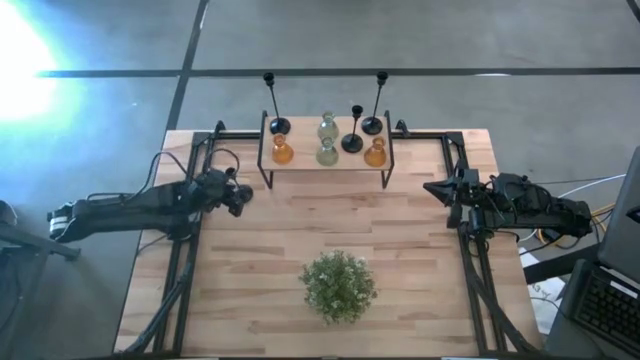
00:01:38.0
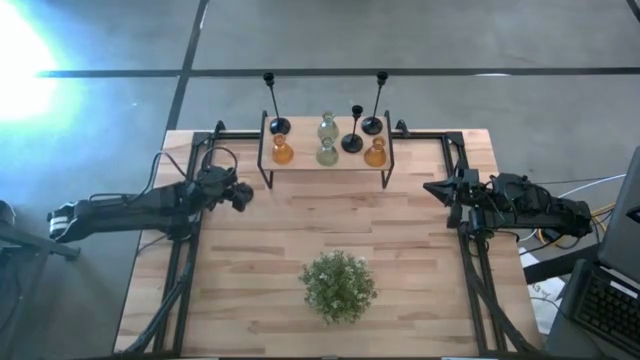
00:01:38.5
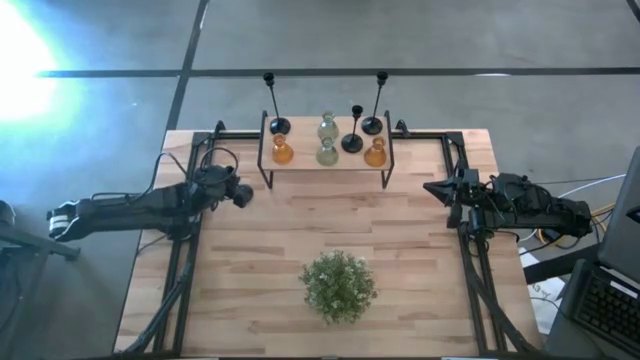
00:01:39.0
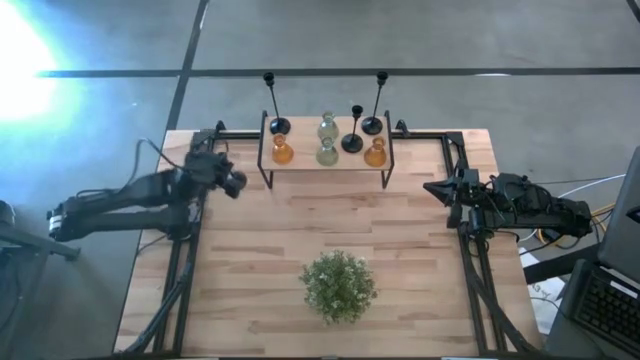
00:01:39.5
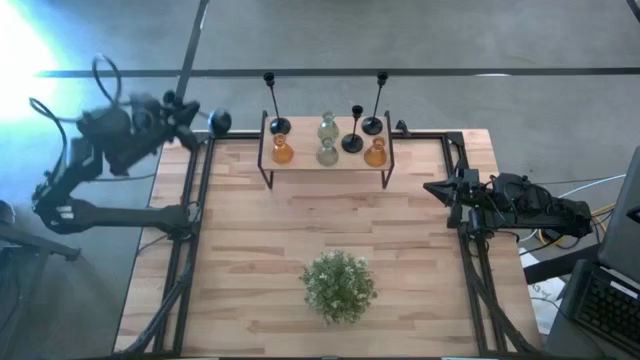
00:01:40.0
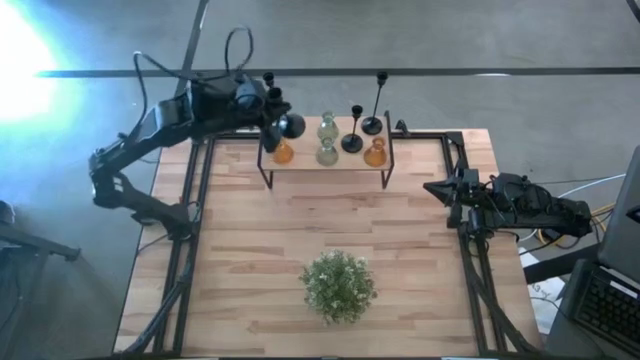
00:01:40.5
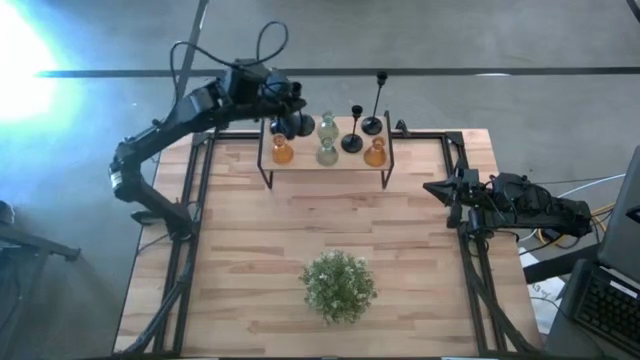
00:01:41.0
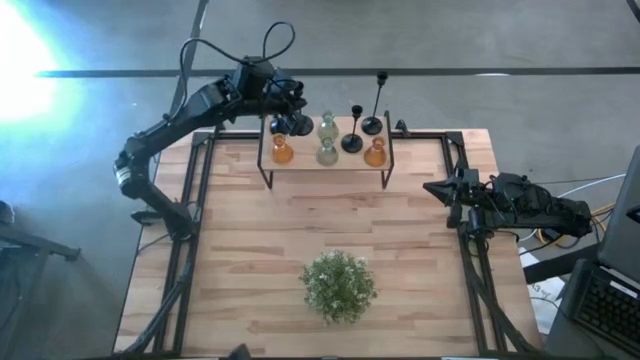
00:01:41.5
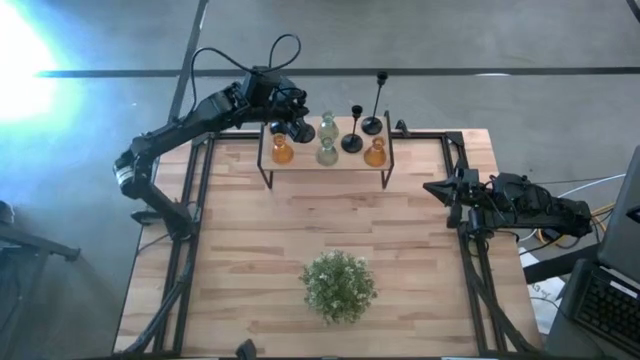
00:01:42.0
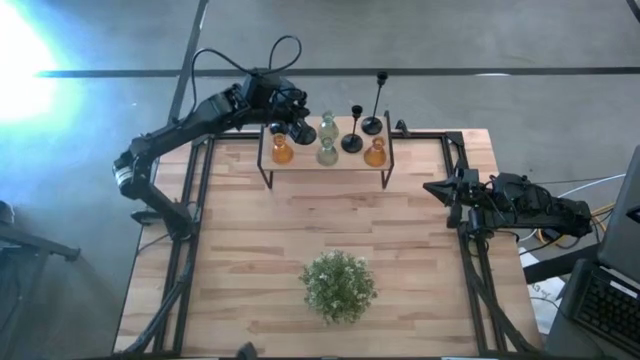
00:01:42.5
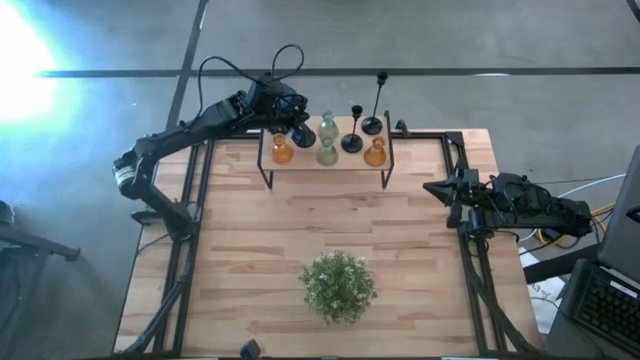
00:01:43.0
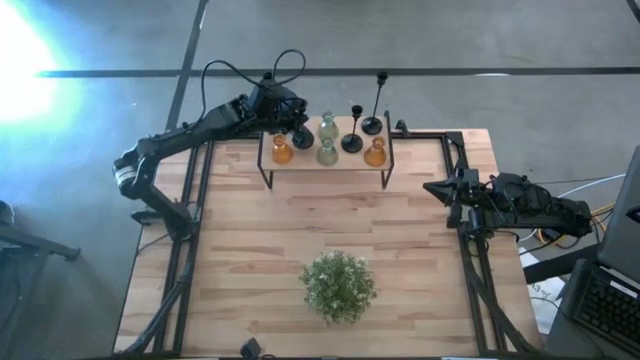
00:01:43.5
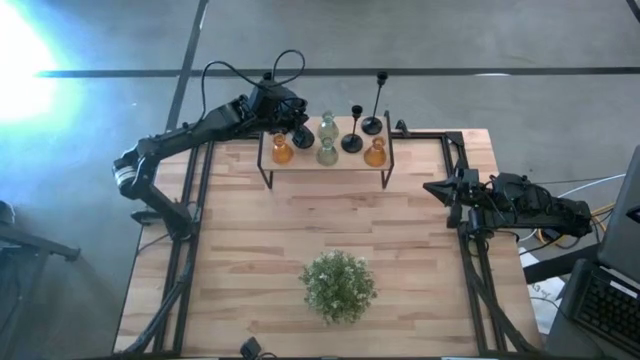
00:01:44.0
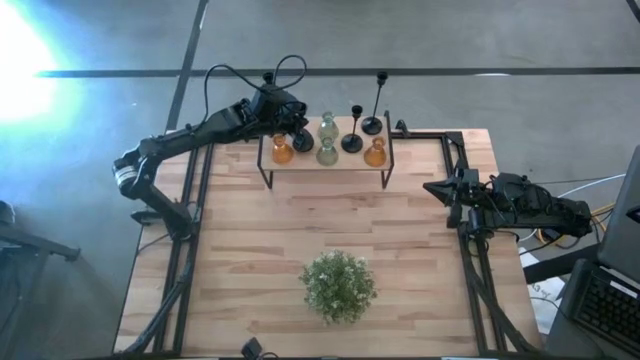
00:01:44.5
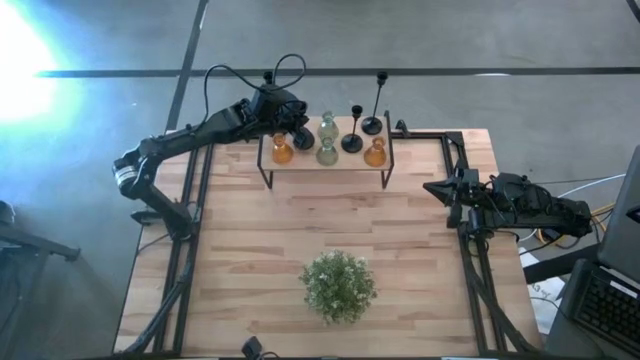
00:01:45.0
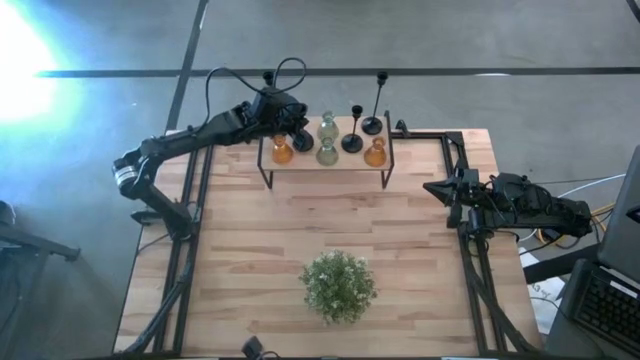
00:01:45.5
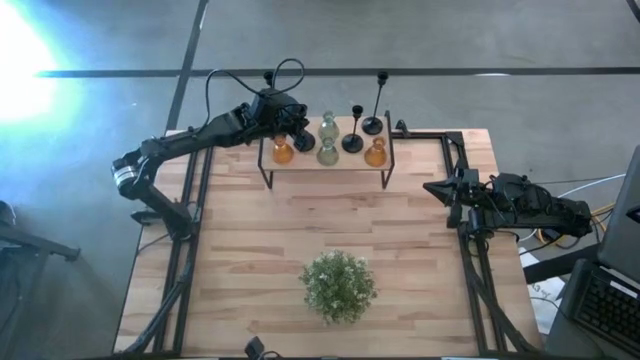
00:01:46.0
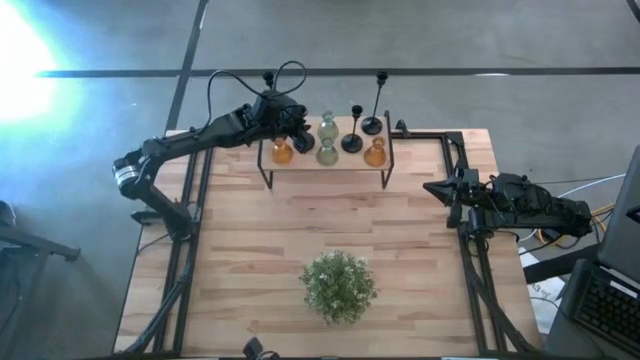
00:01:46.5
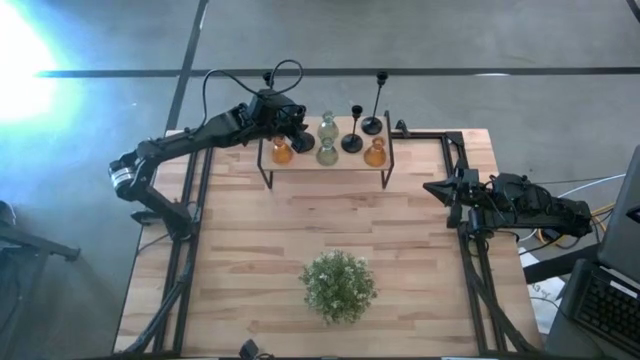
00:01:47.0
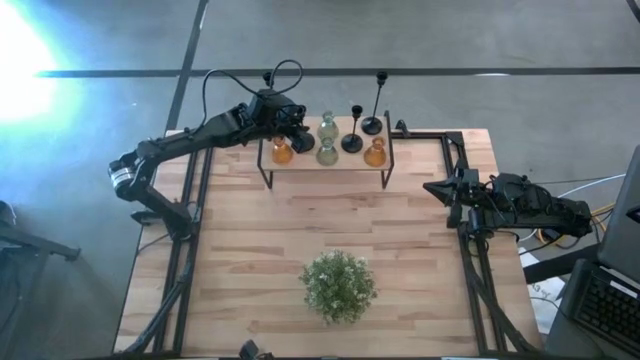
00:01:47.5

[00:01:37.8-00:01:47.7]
Task: Pick & Place candle stick holders
Put the small black candle holder on the shelf

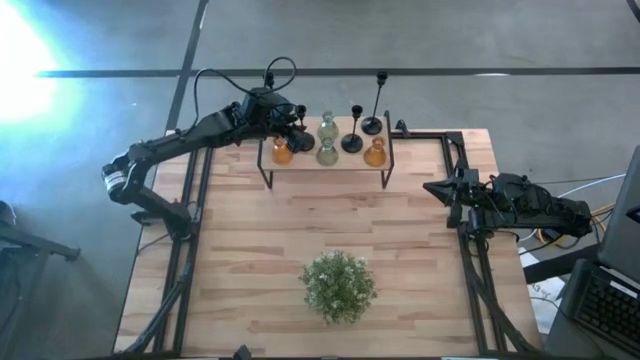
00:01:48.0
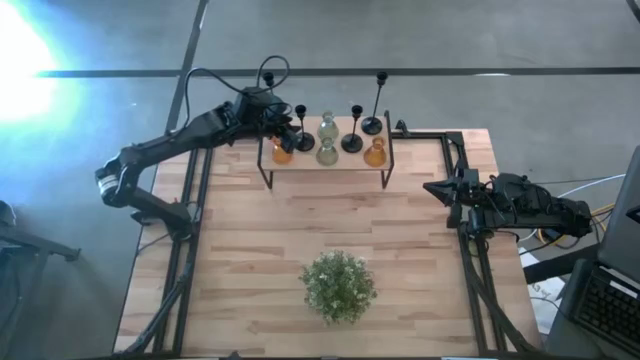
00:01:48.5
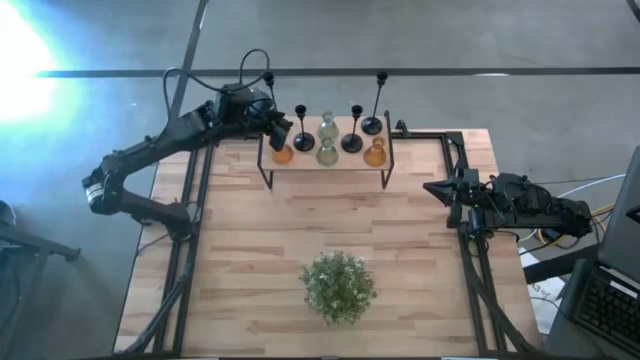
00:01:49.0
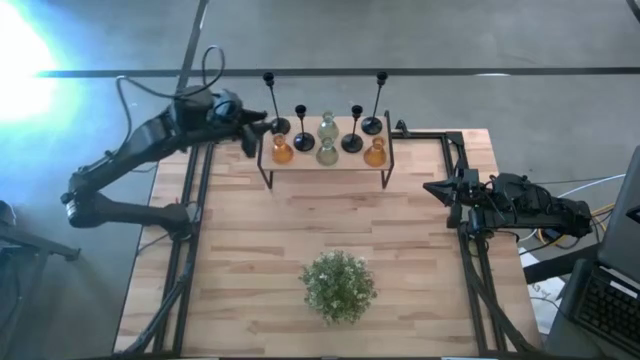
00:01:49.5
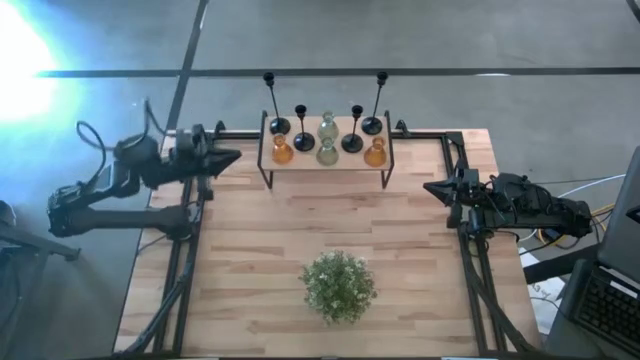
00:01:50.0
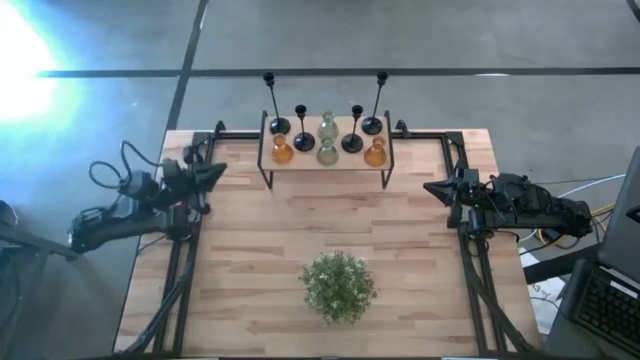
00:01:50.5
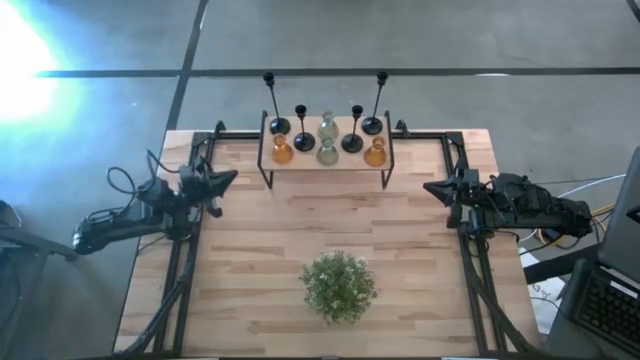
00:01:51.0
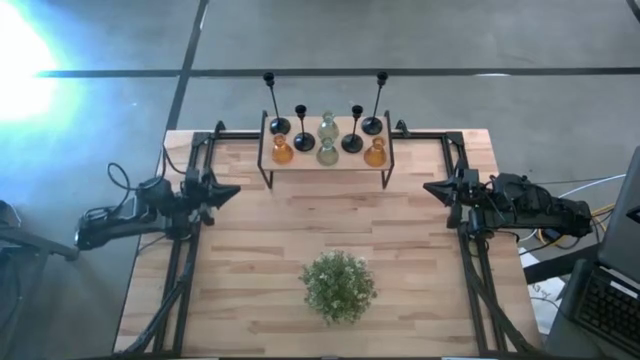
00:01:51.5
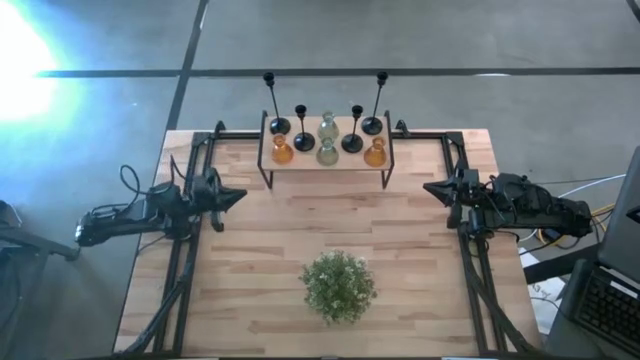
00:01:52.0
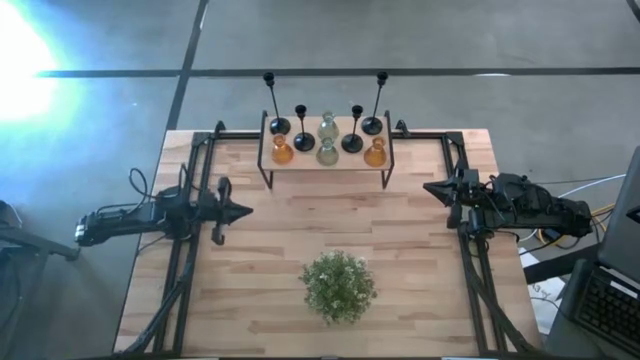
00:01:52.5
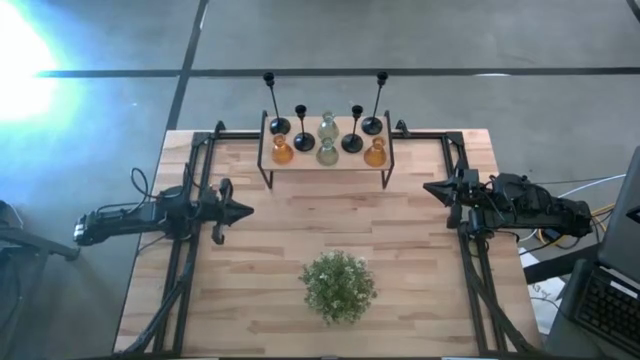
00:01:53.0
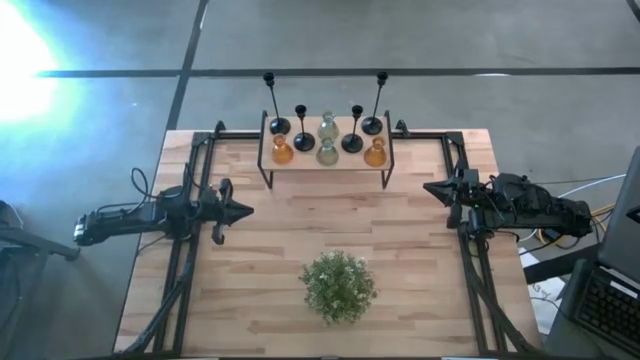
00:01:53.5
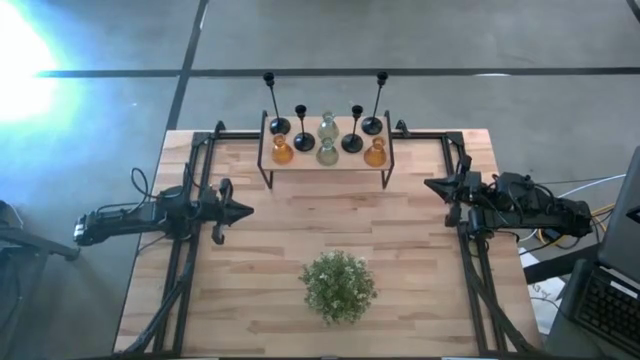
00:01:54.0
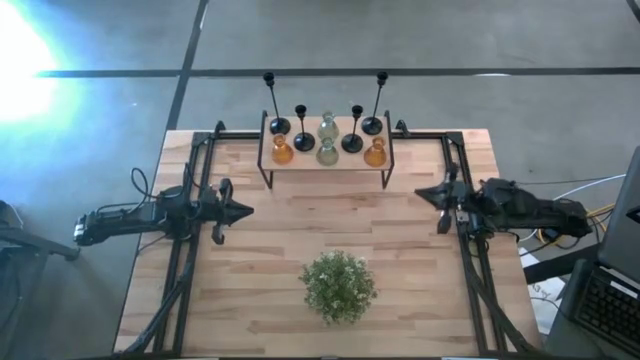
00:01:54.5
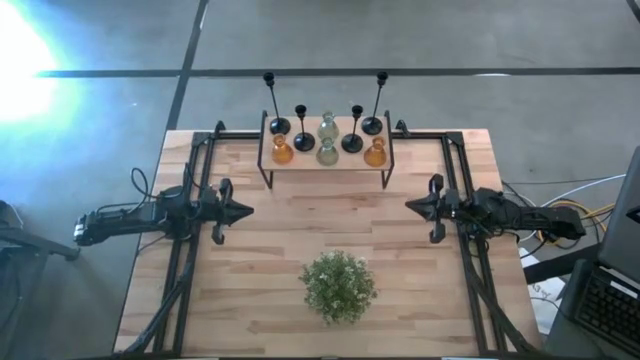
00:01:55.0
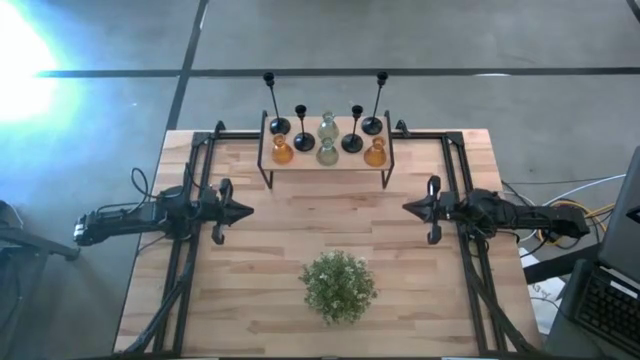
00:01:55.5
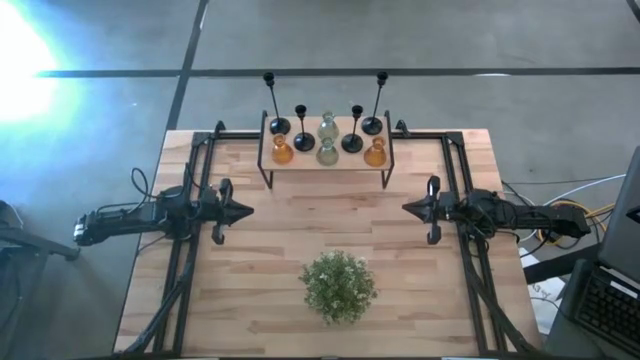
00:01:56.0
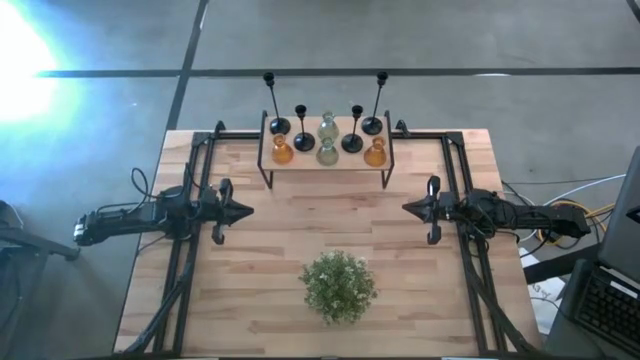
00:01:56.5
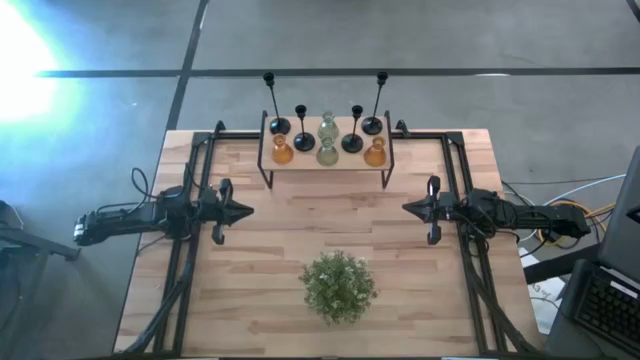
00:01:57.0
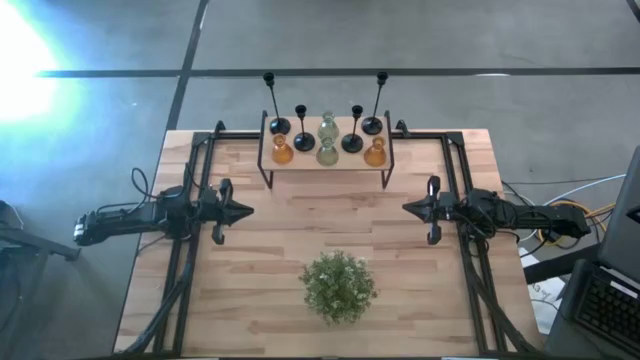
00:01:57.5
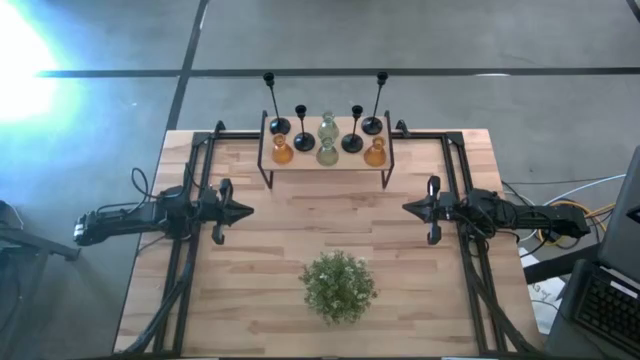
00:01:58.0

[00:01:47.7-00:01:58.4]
Return to Home Position
